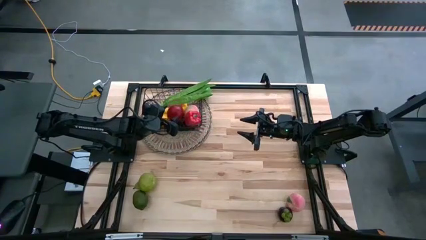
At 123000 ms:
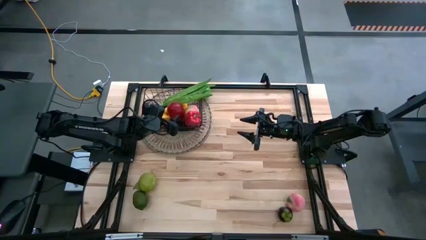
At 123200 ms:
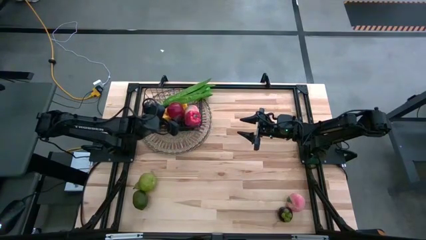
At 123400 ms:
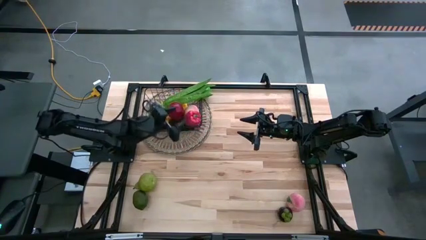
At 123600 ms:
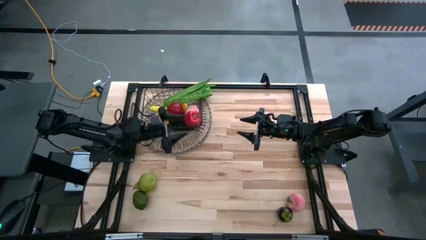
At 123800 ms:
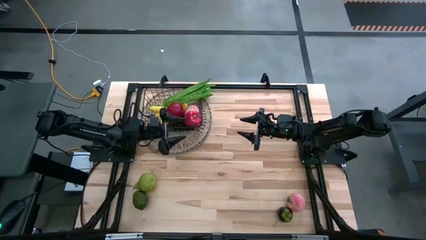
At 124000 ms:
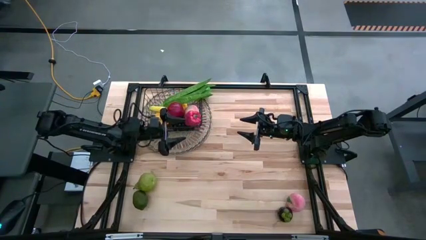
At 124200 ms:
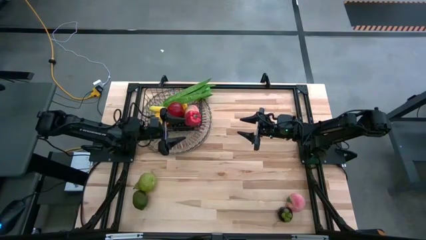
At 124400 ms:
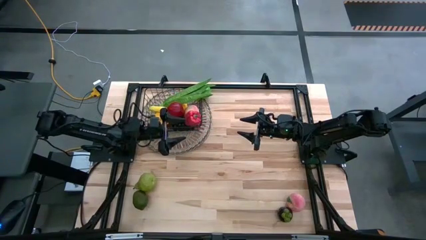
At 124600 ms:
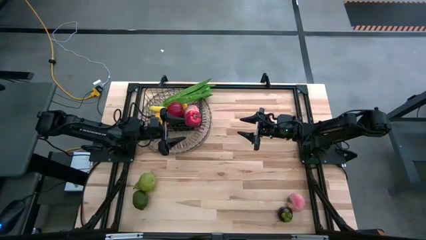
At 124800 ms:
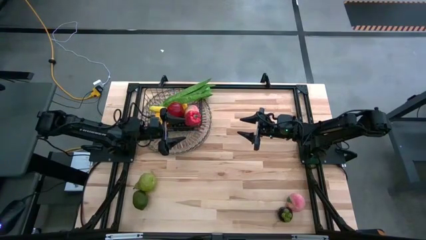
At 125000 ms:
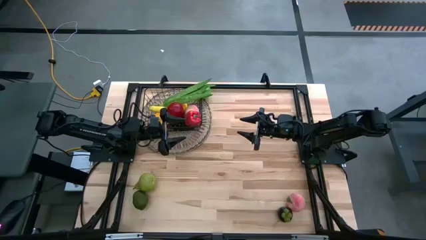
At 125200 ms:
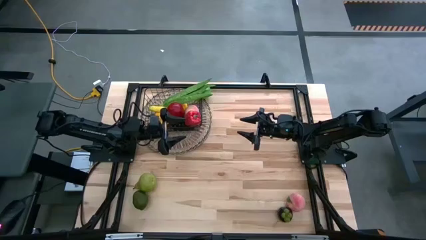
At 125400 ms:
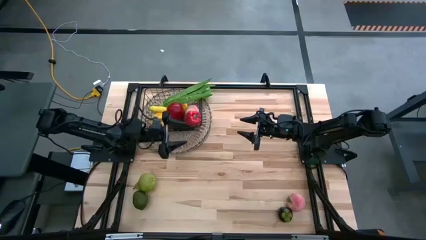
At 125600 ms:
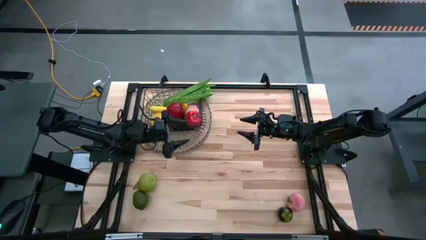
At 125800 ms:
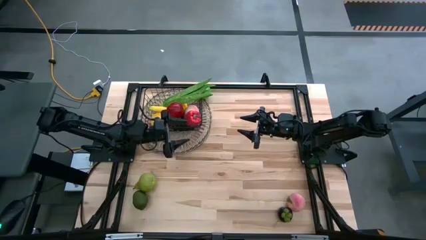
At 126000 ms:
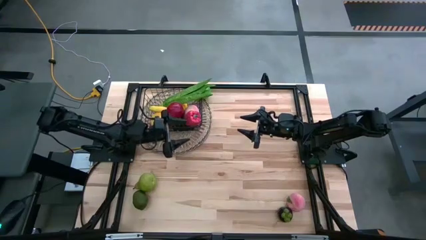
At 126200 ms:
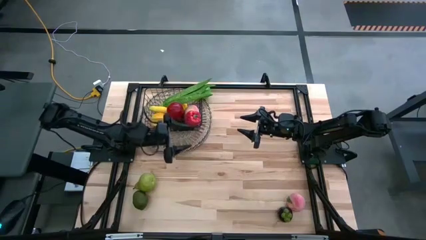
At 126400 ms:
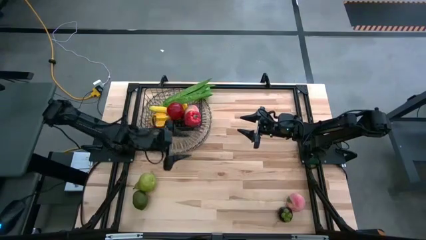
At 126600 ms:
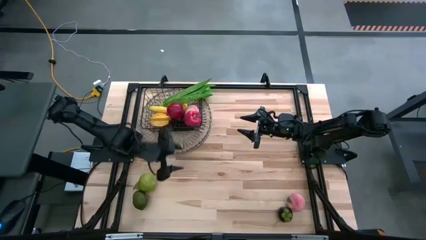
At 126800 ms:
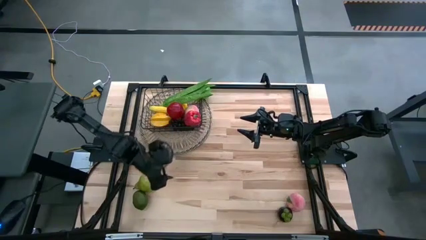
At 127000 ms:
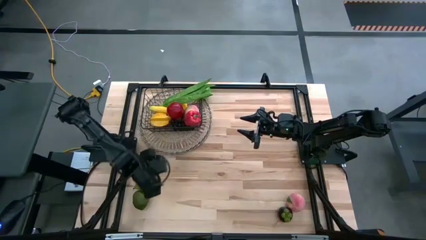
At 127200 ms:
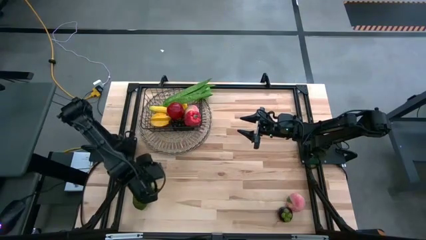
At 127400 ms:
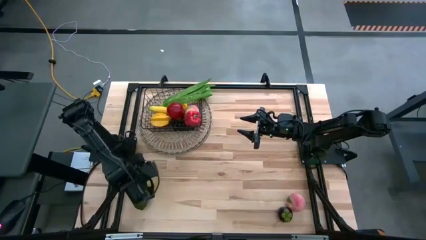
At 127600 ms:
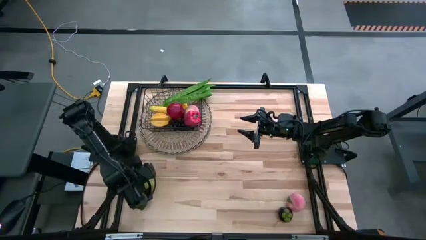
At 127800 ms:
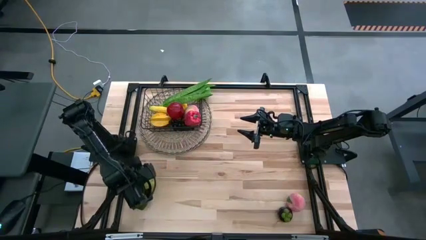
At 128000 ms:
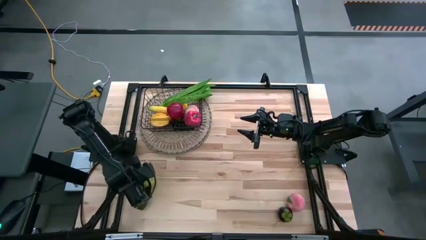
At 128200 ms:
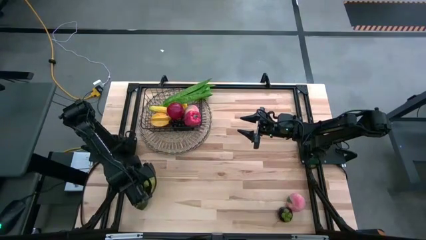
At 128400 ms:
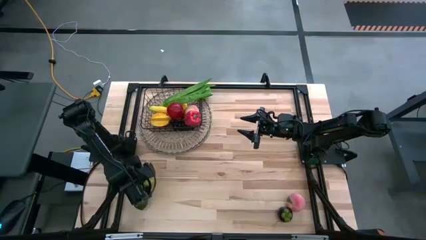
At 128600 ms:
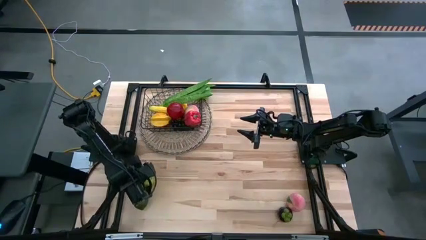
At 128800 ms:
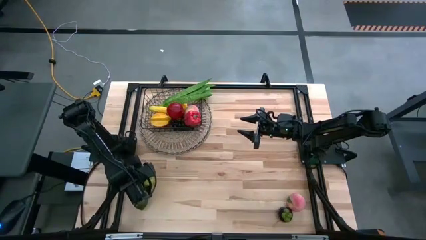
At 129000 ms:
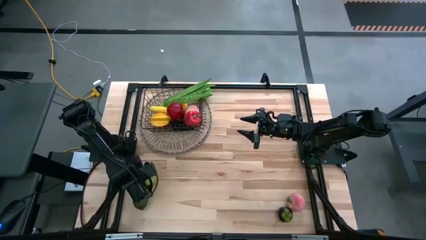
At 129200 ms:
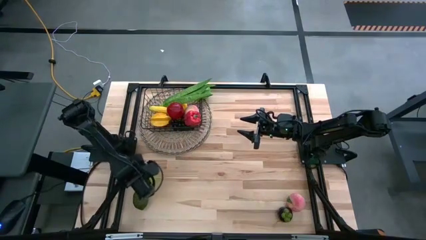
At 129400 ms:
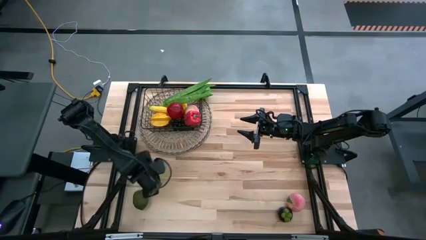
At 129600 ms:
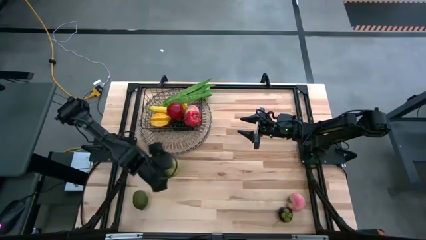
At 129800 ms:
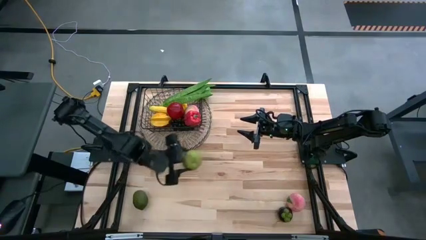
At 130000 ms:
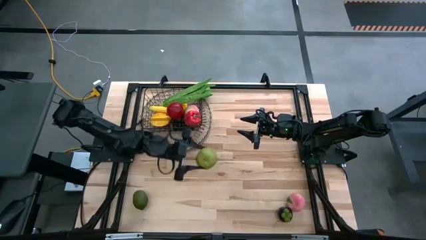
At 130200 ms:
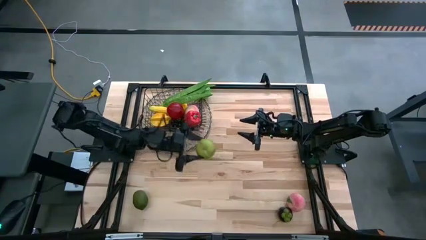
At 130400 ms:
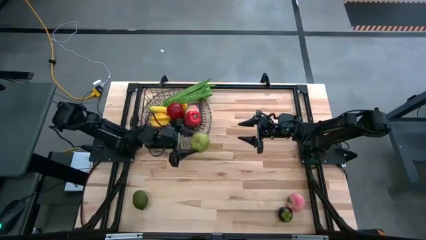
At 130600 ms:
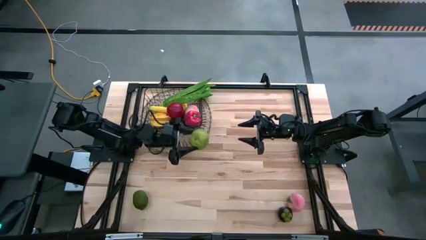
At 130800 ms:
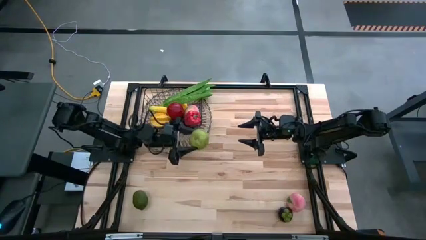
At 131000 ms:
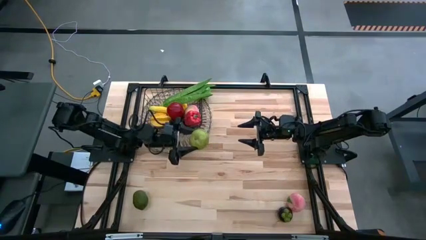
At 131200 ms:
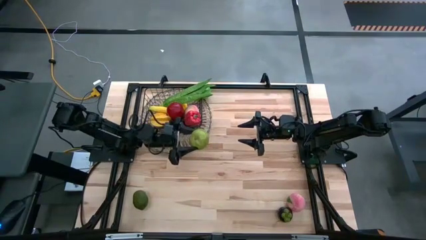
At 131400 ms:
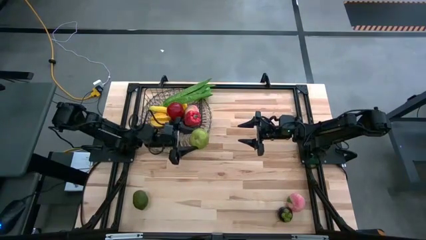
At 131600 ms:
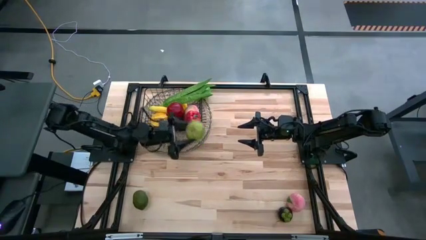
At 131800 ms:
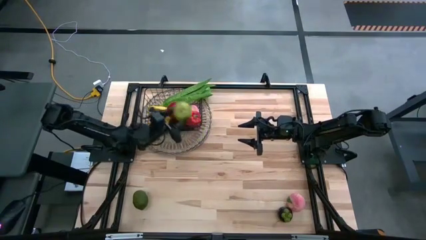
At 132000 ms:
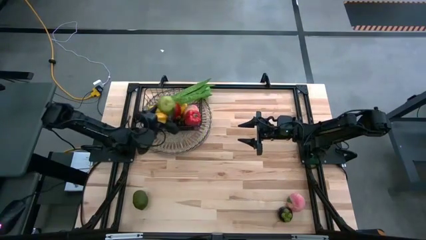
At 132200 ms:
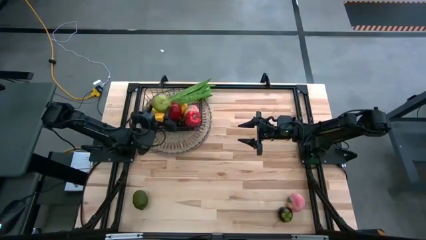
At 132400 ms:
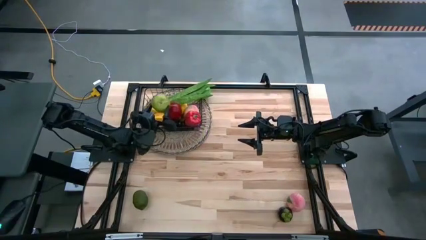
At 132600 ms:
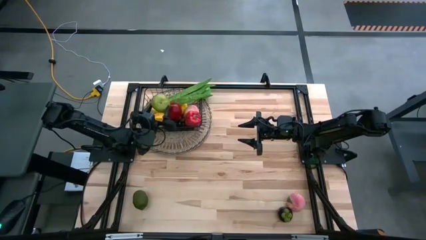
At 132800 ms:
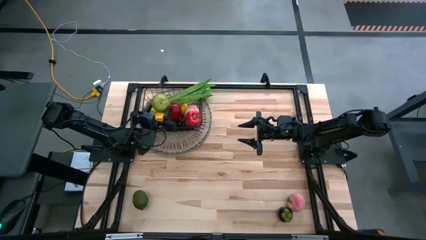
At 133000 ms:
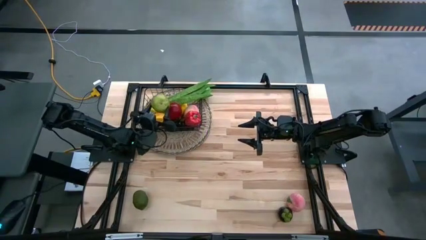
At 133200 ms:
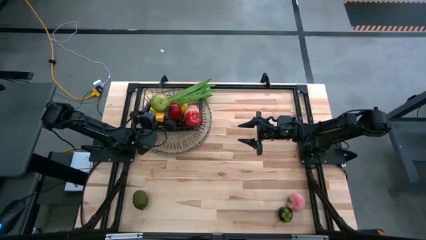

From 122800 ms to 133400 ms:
Task: Build produce basket
Put the green pear into the wire basket
